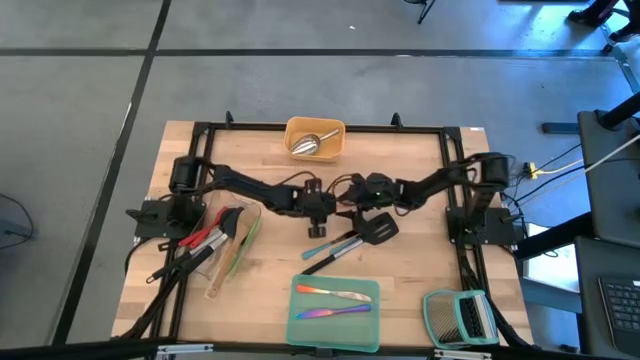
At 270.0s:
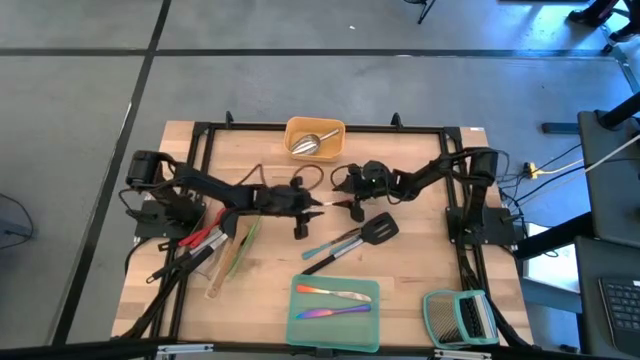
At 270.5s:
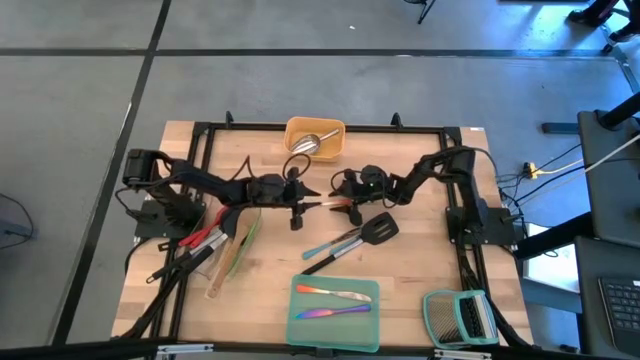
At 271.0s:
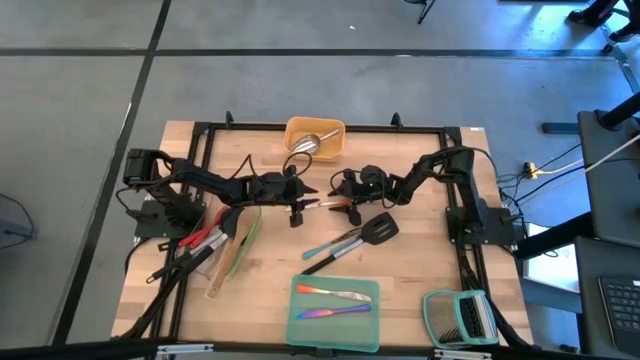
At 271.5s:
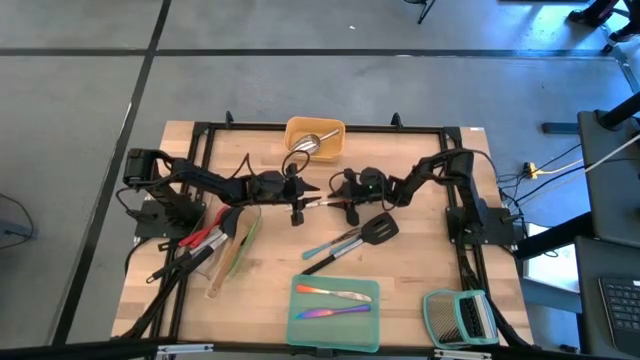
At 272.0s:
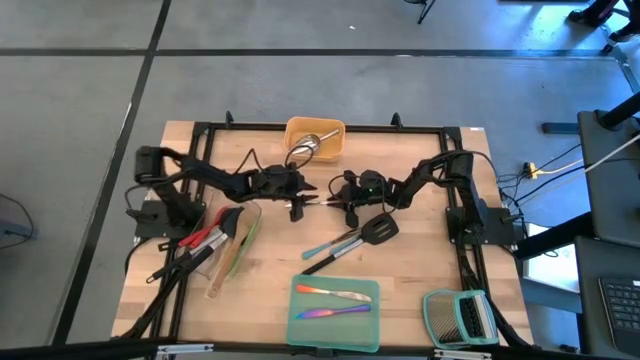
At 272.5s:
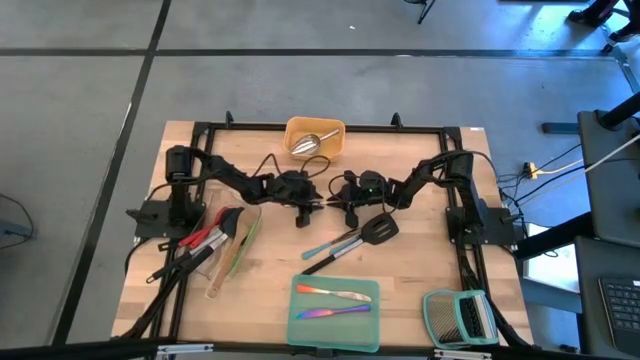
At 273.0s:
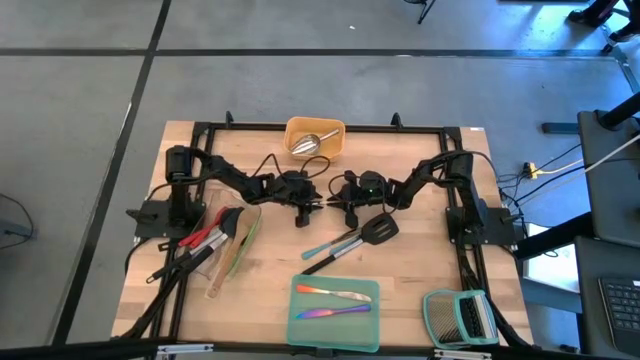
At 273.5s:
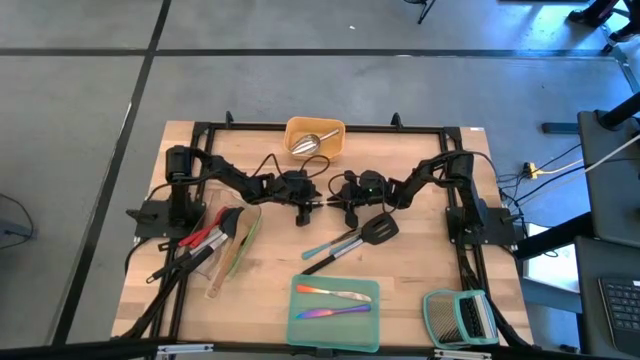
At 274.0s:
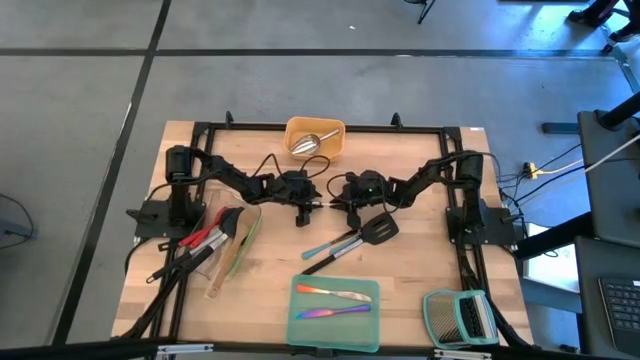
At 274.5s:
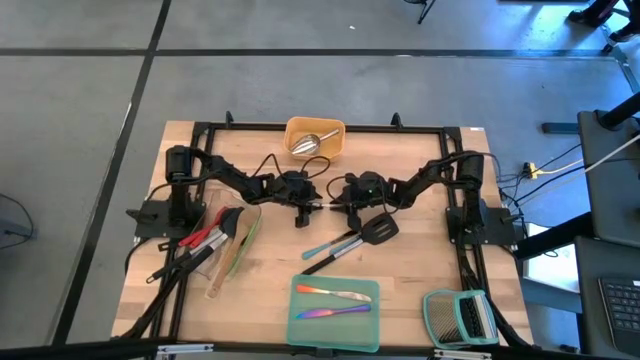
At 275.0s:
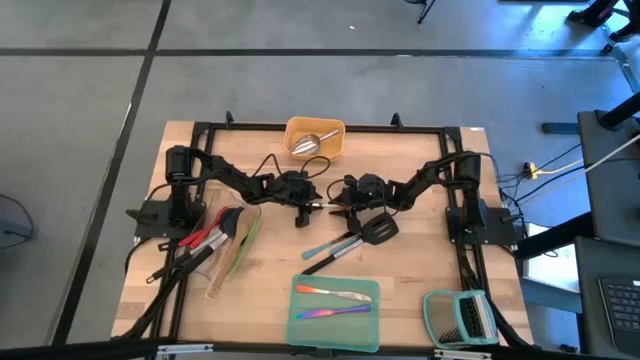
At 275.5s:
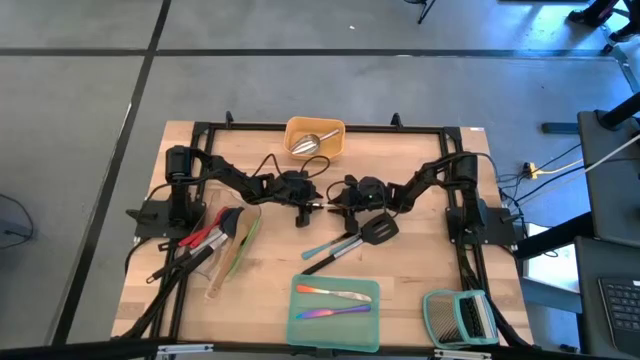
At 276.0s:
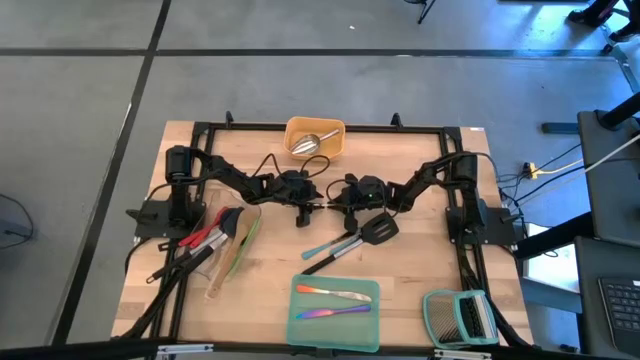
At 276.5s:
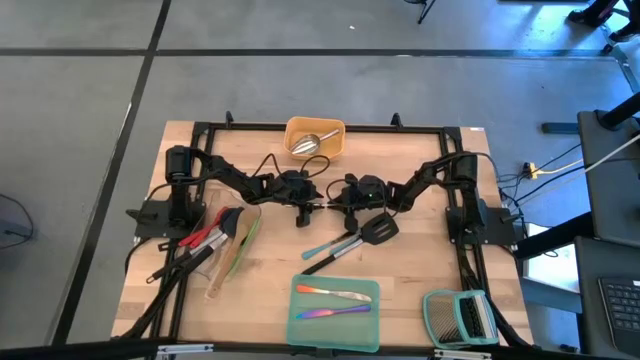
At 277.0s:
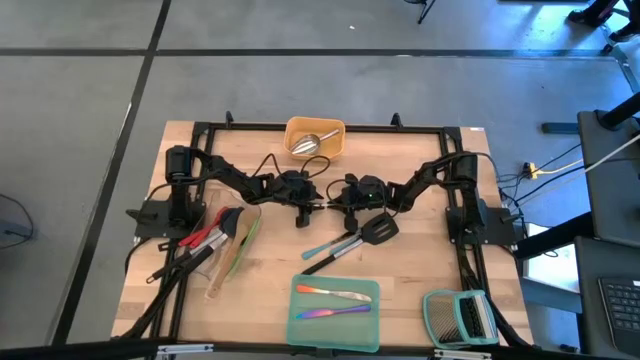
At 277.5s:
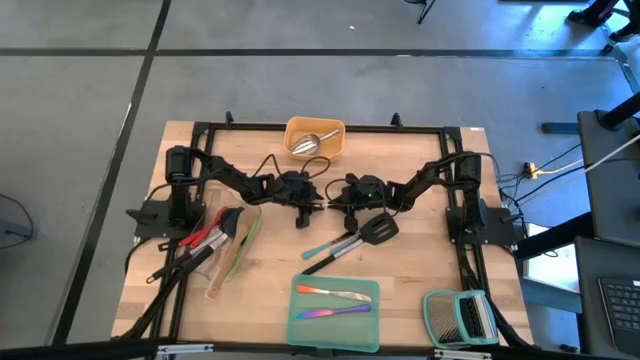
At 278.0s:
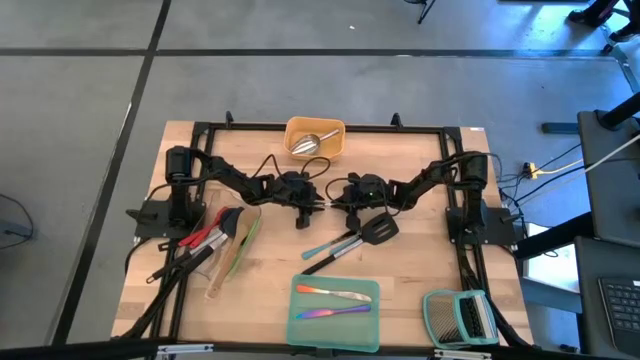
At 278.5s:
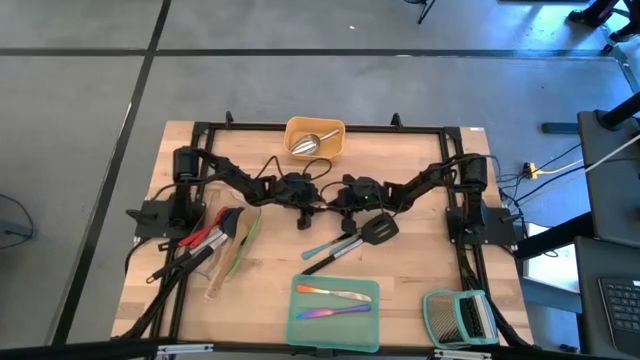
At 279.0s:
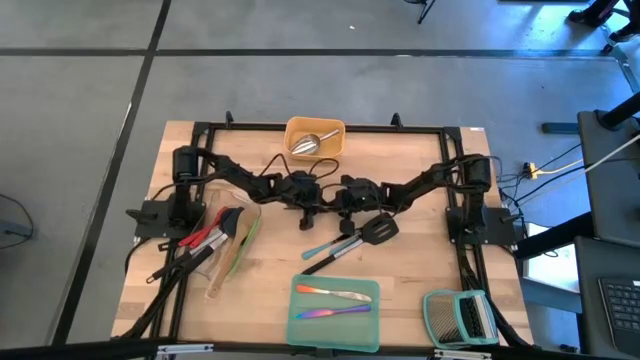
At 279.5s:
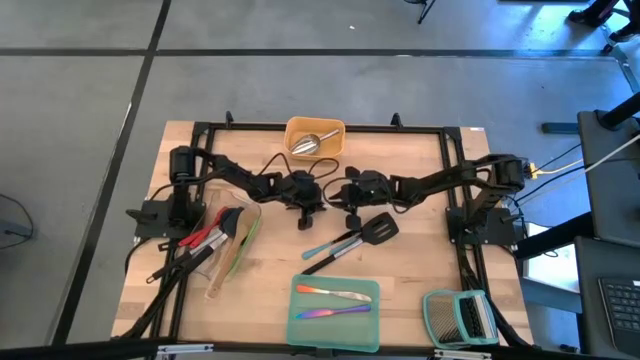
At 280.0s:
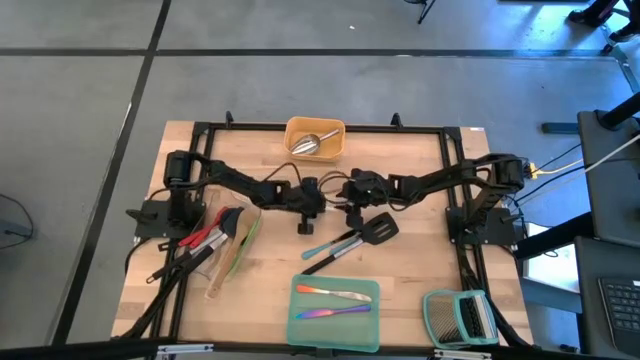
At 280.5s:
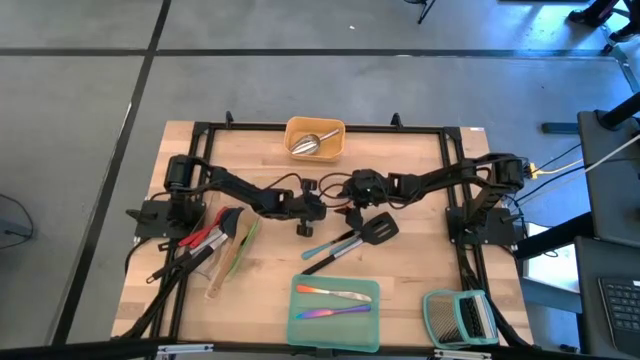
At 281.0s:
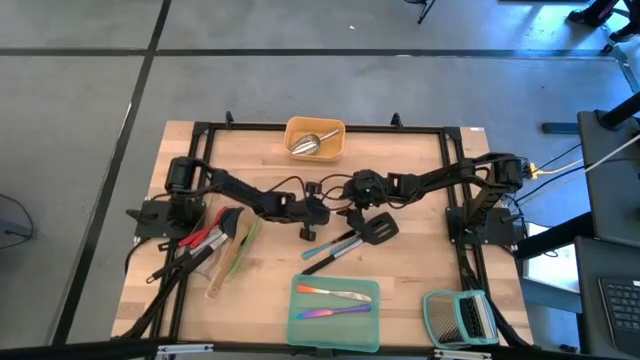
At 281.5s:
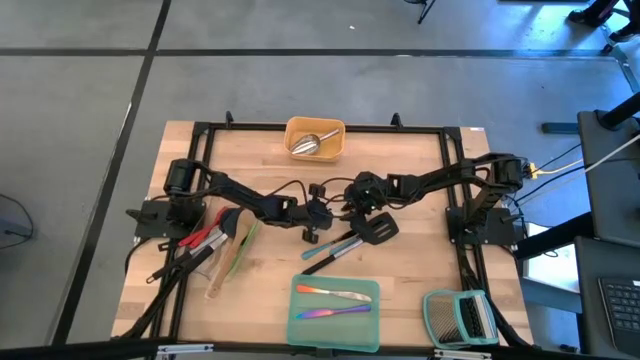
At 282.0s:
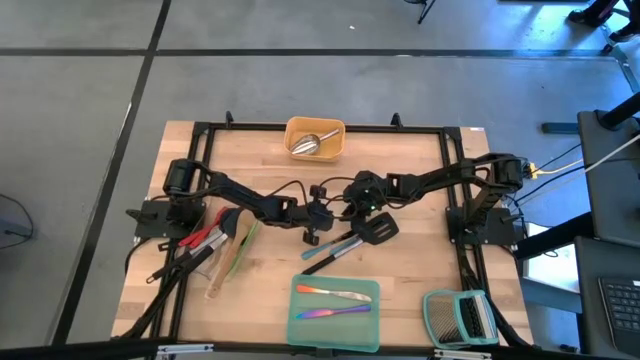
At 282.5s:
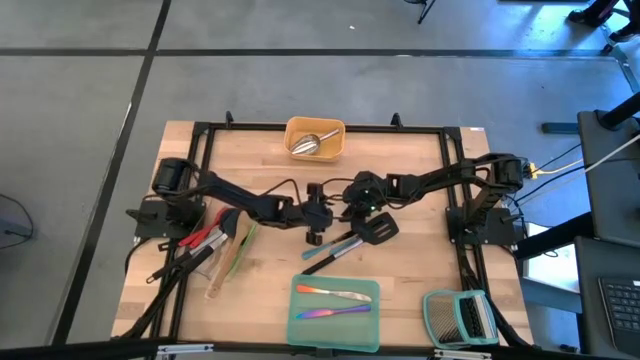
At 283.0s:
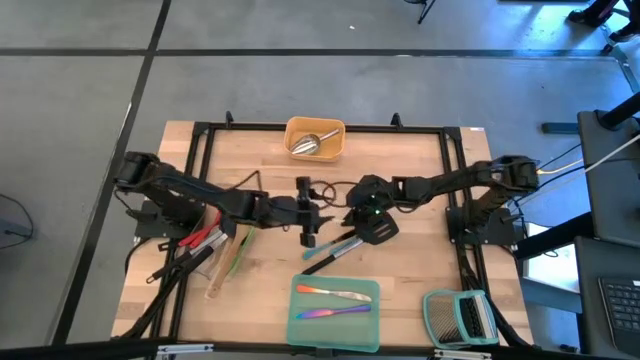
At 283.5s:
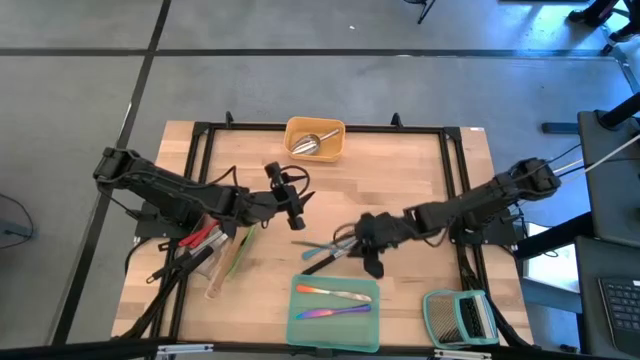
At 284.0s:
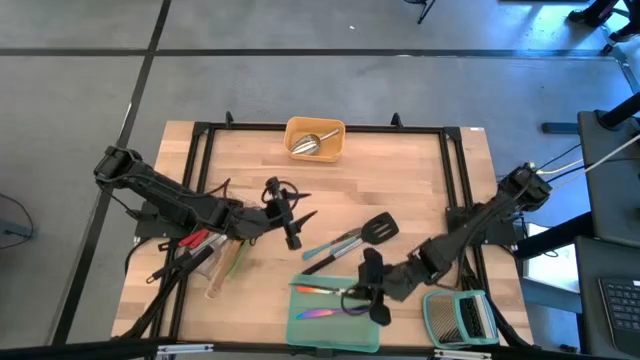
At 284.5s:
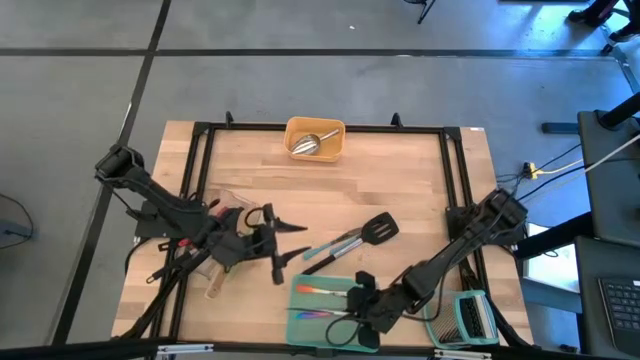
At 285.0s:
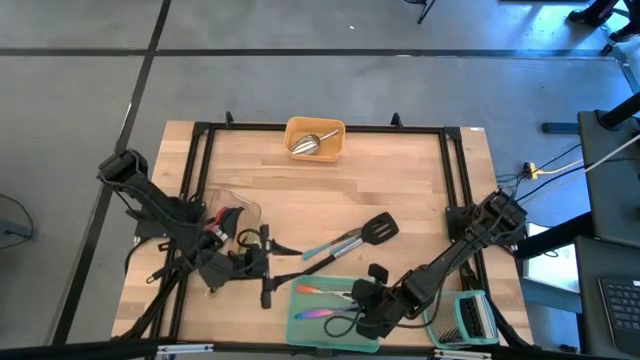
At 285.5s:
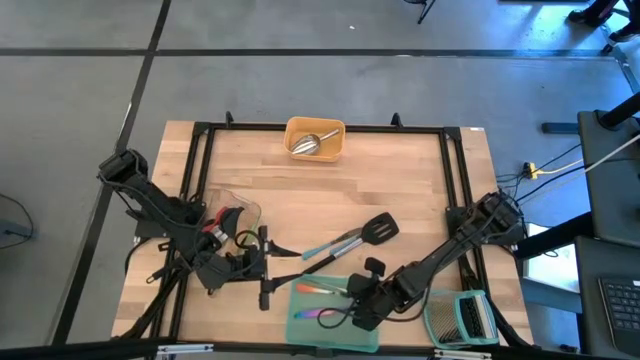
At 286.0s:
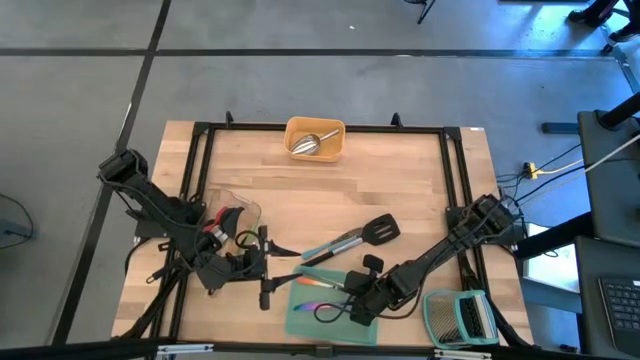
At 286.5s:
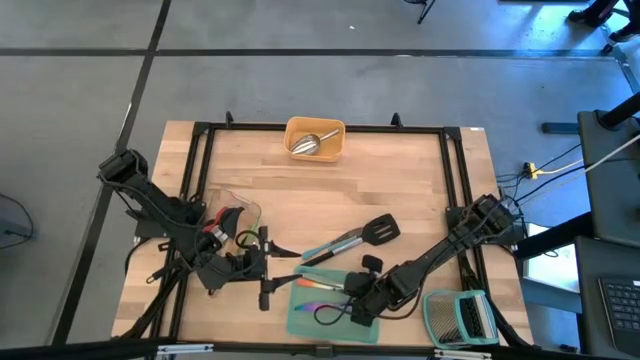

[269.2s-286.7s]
Task: Pick & Place Kitchen Items
Put the orange table knife into the green bin

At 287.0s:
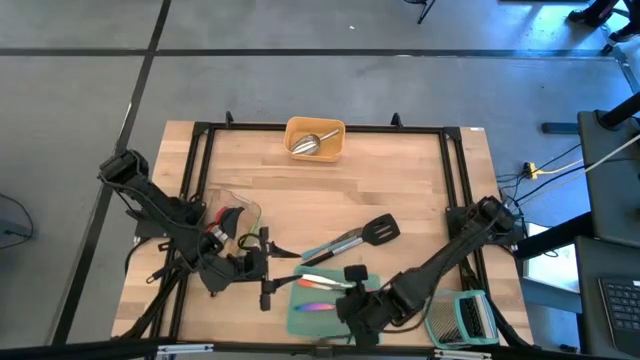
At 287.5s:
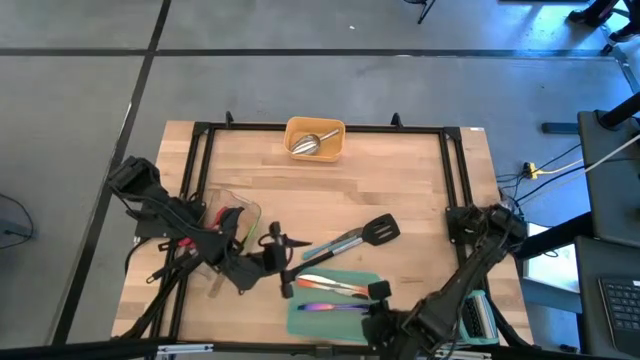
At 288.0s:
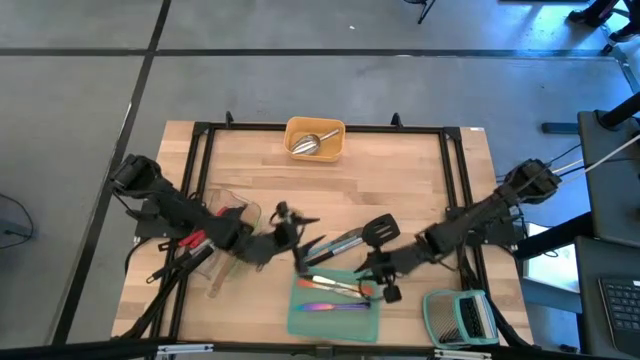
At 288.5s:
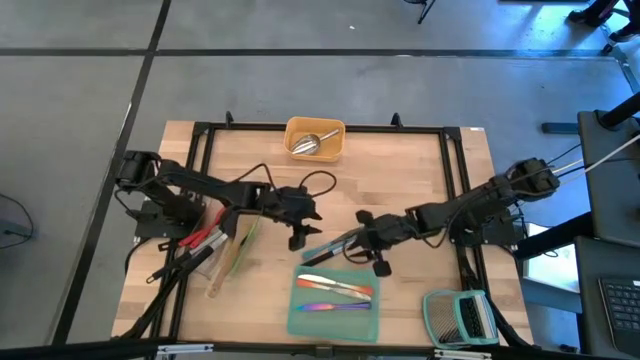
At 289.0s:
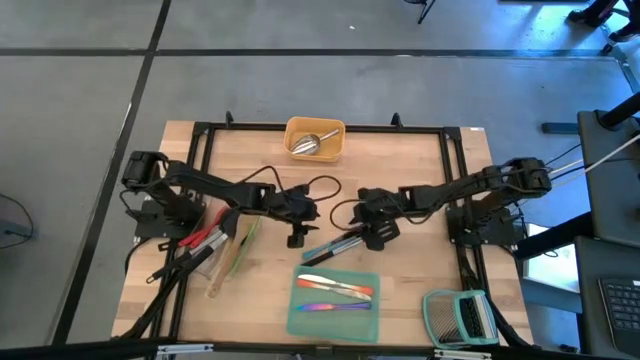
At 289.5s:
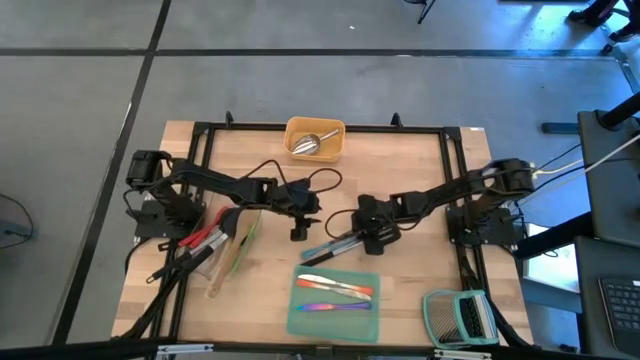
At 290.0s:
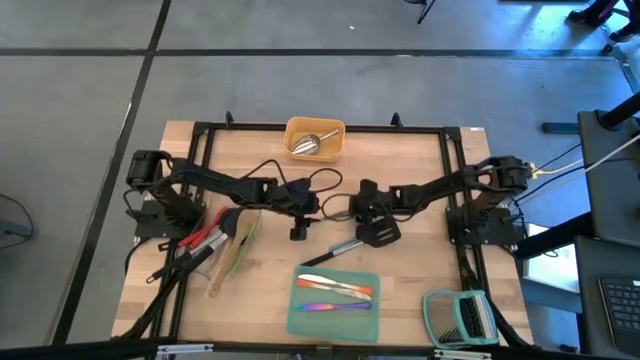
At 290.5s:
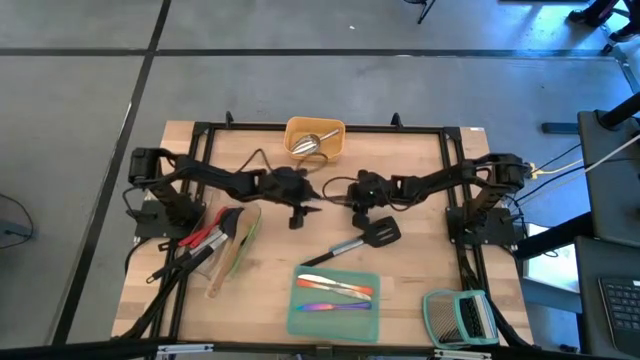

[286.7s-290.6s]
Move the blue table knife to the top
